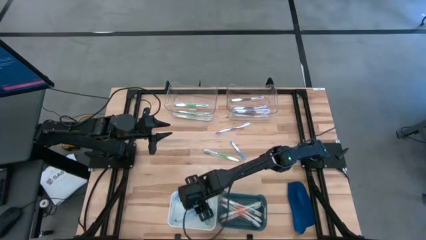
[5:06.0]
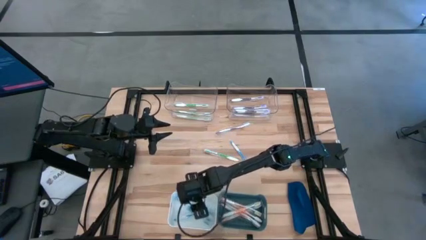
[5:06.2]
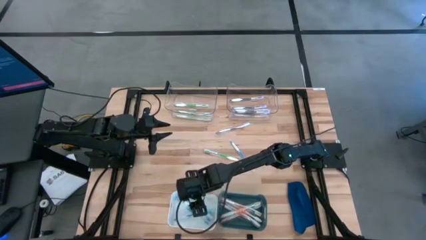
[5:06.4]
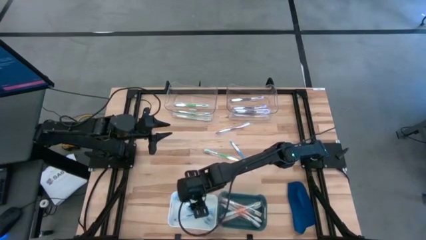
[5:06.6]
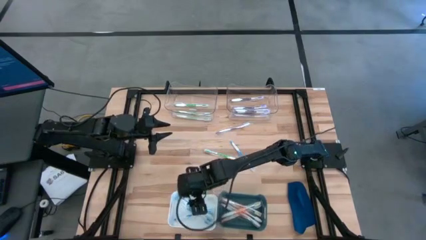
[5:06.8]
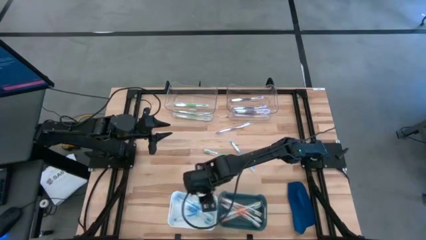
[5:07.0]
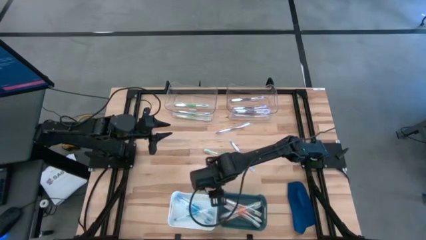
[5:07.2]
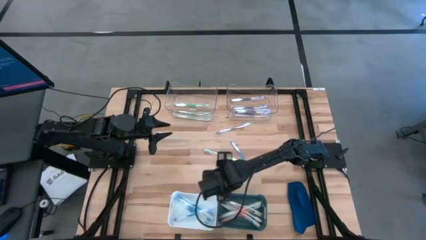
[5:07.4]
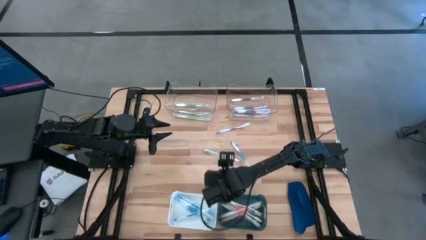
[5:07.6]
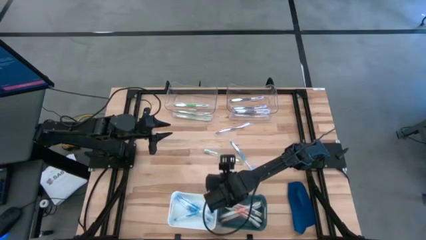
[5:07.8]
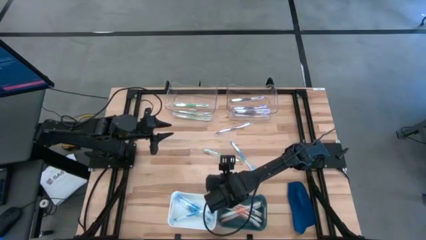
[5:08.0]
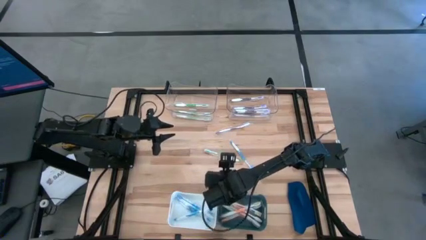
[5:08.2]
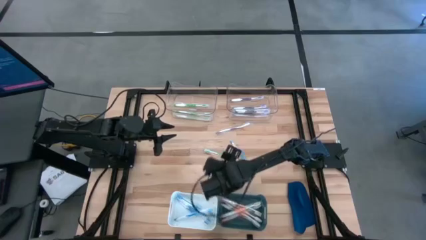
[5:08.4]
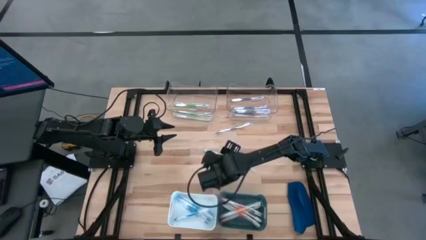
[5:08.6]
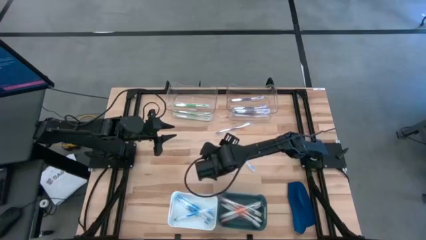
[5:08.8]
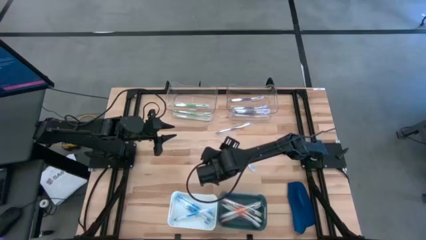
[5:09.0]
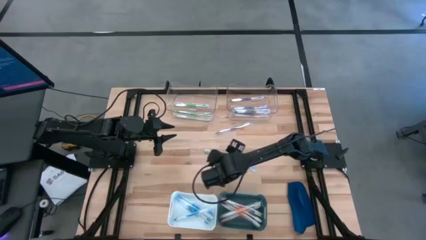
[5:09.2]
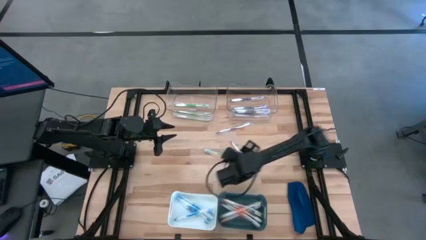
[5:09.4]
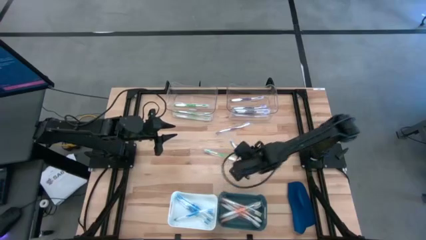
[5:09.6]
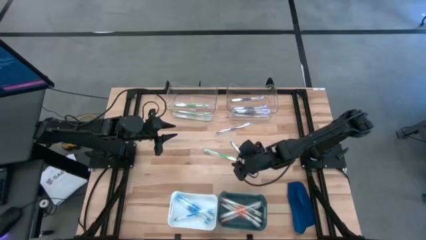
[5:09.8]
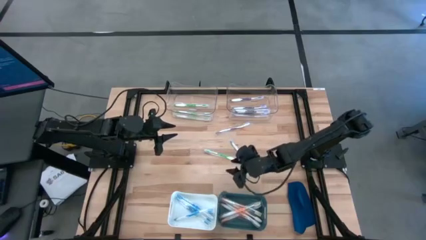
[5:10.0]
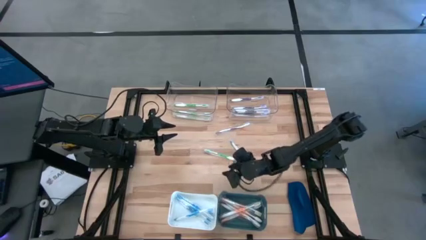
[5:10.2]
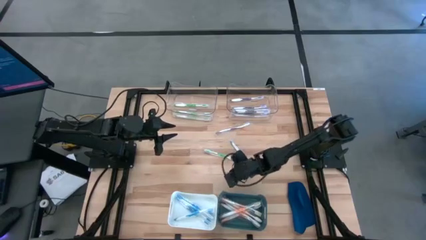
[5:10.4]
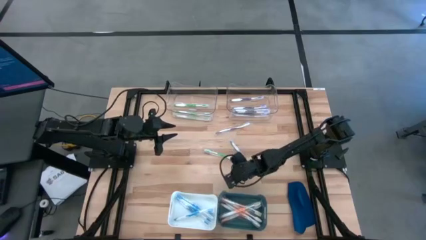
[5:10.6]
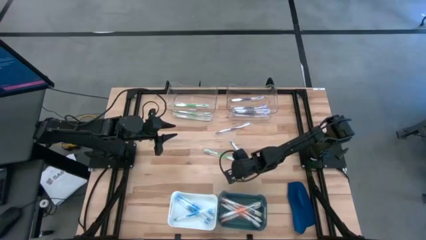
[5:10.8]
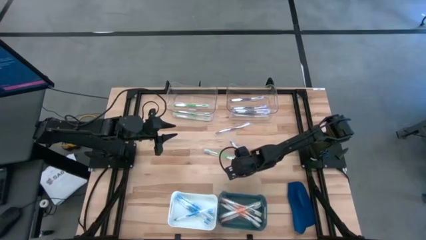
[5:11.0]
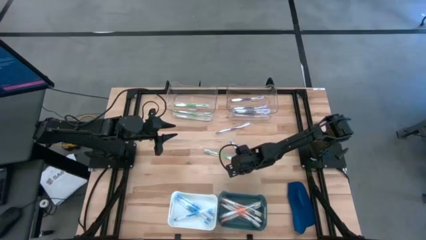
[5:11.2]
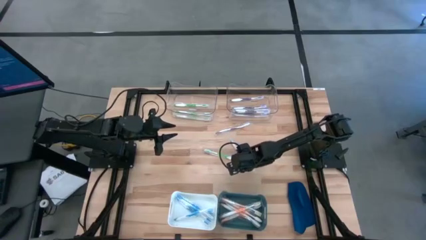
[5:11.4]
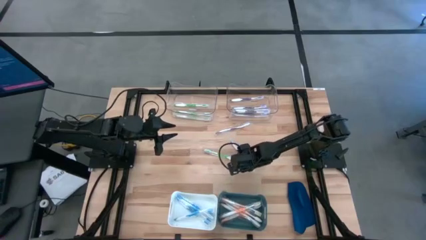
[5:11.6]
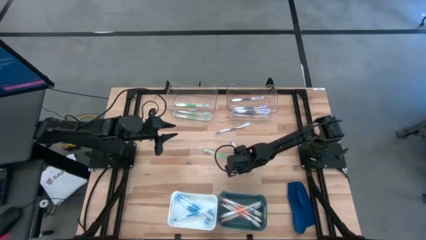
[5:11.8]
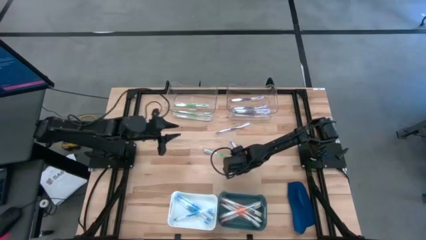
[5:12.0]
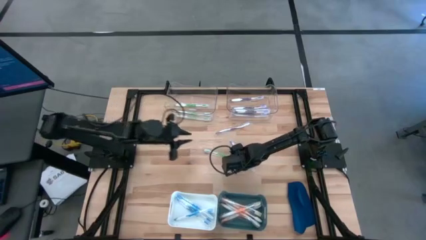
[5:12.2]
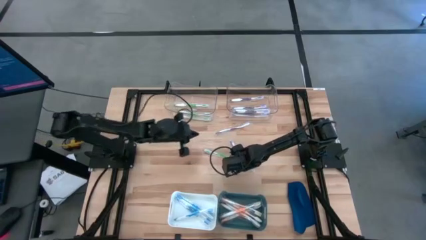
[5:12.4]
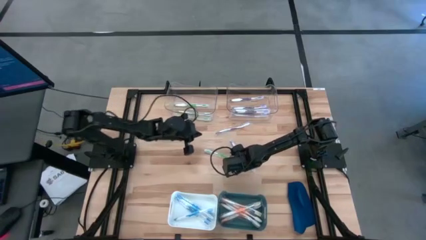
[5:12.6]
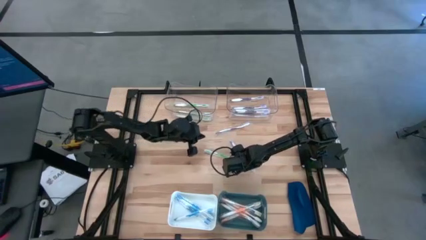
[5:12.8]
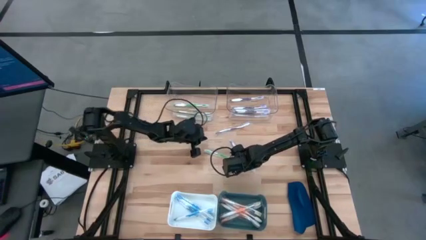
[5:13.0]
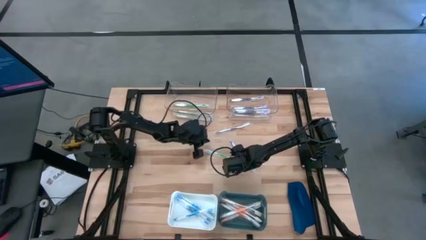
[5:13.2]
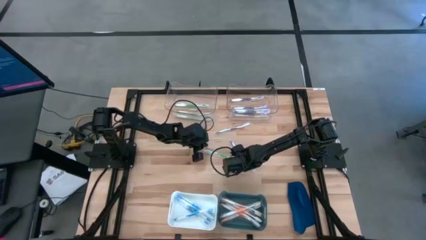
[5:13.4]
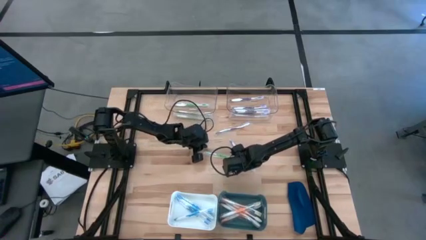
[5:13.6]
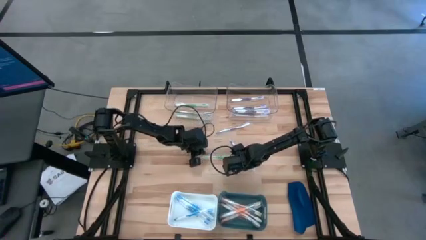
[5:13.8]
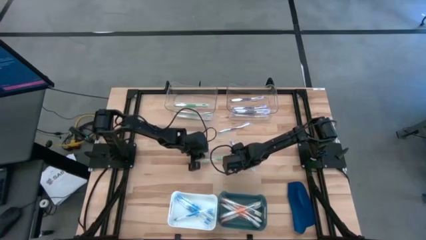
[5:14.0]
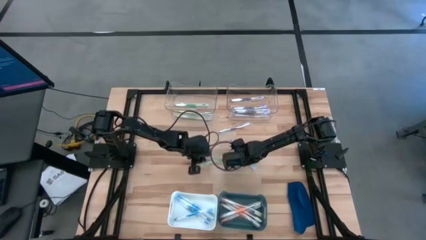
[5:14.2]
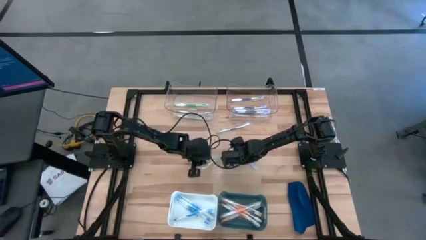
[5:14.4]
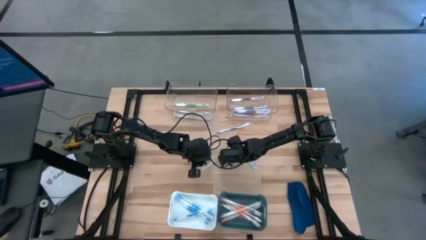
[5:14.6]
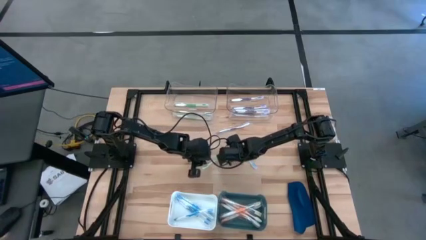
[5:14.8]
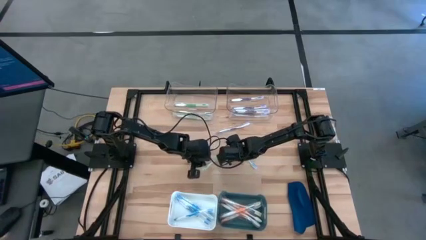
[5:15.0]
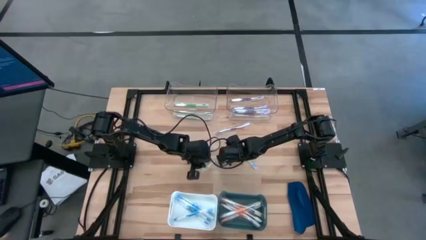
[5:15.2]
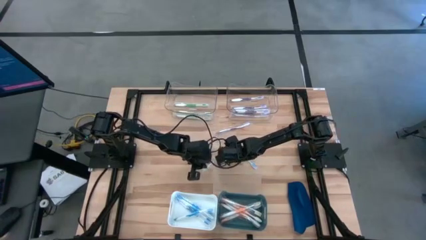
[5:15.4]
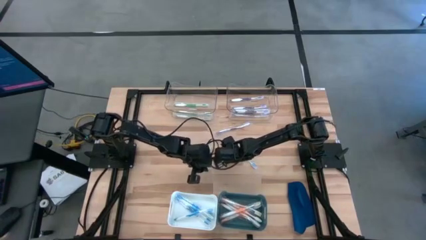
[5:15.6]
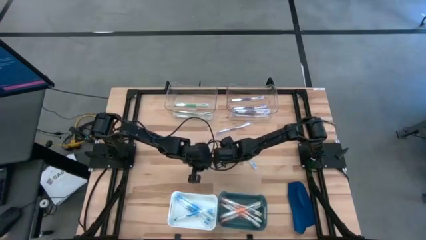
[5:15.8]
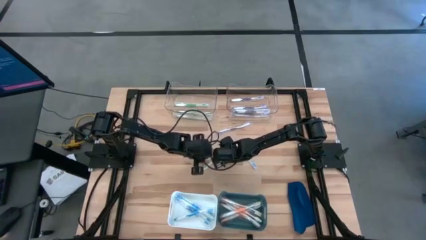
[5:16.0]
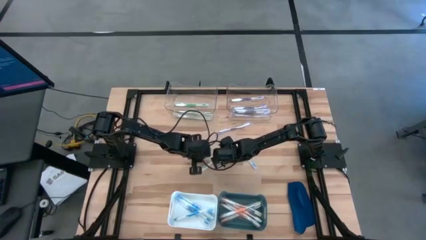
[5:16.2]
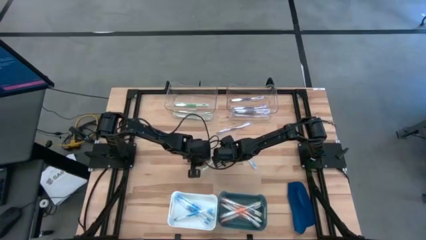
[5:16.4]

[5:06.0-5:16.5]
Task: Pick & Place Toothbrushes
Put the green toothbrush into the left transparent bin

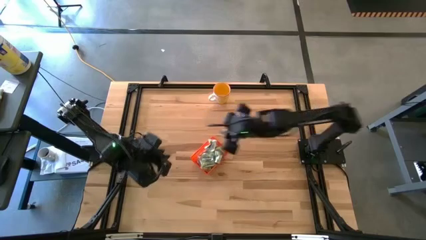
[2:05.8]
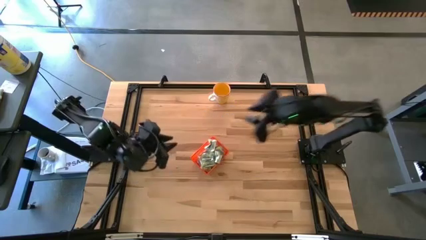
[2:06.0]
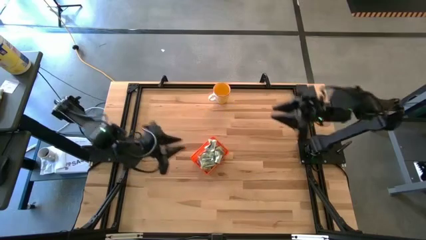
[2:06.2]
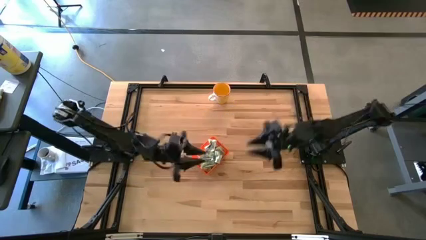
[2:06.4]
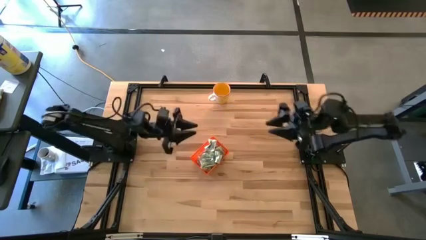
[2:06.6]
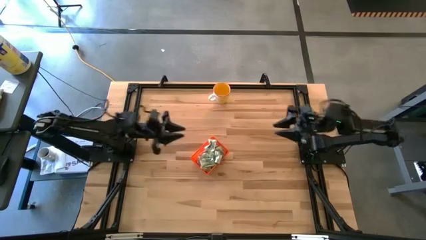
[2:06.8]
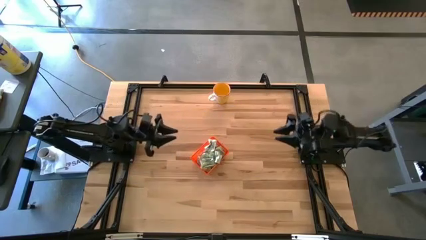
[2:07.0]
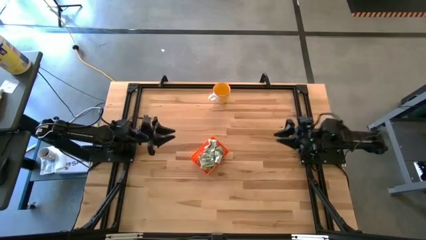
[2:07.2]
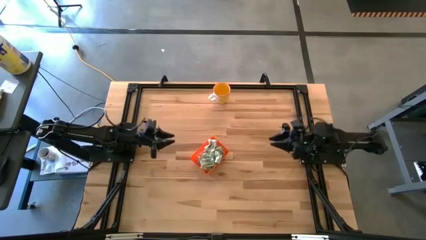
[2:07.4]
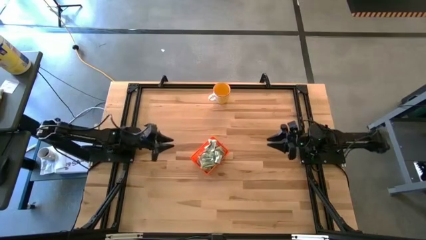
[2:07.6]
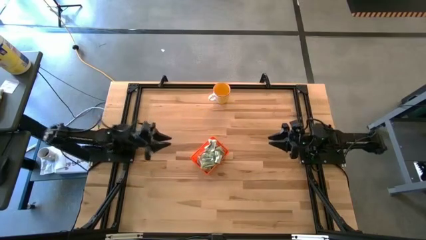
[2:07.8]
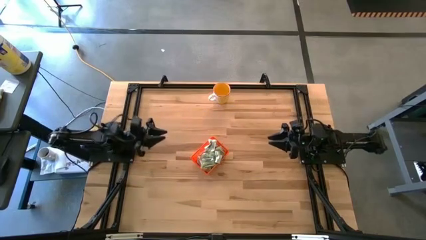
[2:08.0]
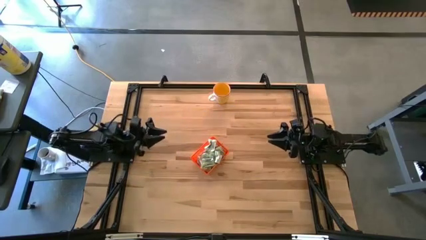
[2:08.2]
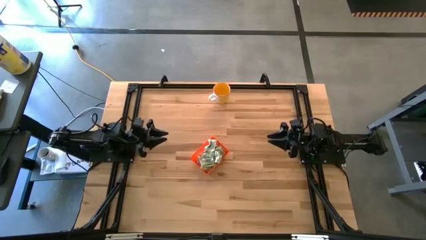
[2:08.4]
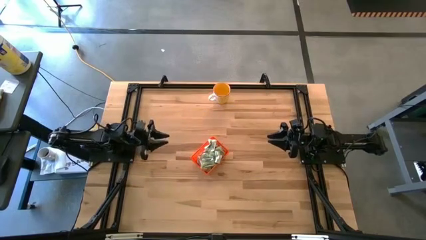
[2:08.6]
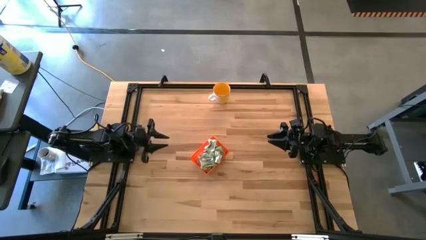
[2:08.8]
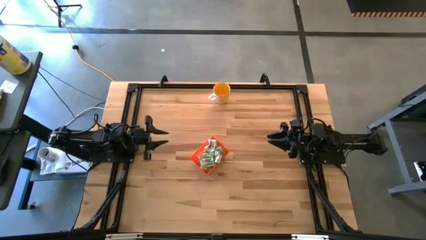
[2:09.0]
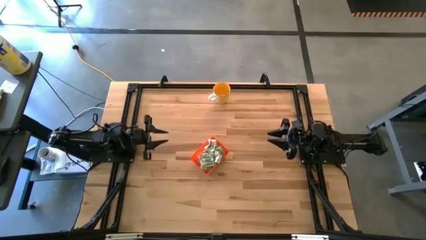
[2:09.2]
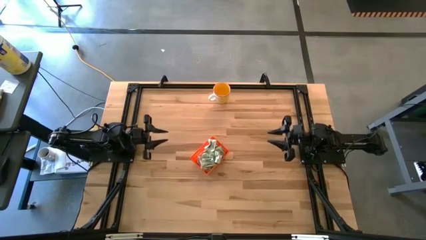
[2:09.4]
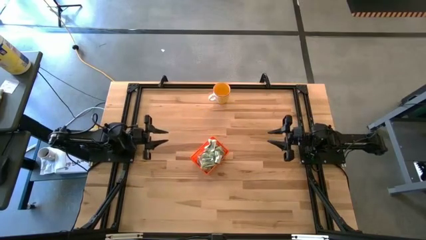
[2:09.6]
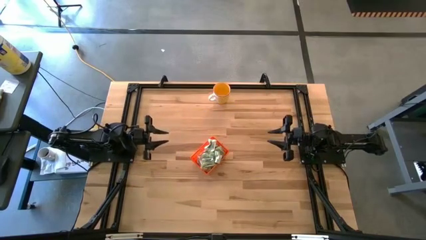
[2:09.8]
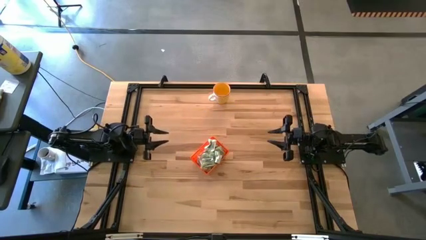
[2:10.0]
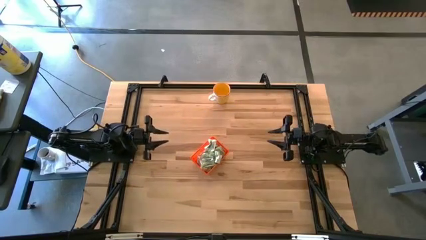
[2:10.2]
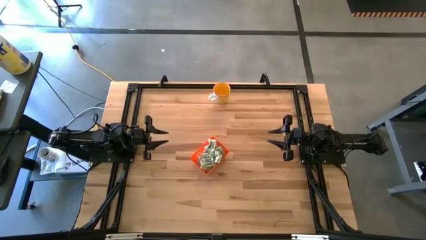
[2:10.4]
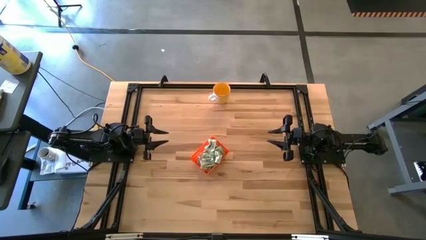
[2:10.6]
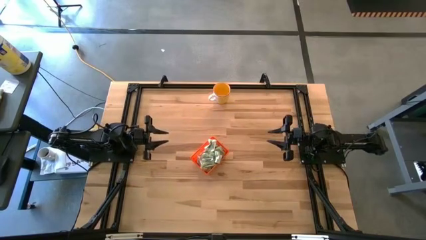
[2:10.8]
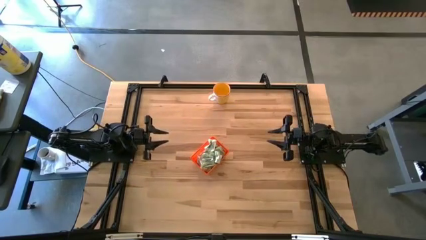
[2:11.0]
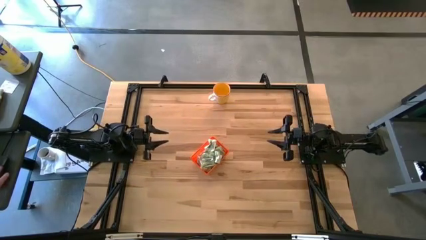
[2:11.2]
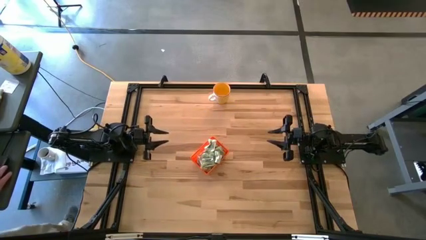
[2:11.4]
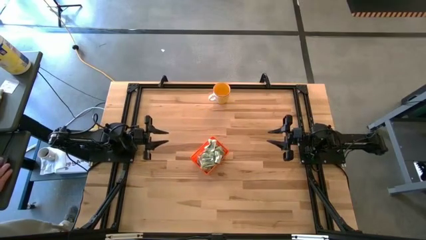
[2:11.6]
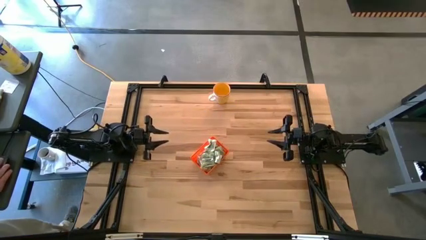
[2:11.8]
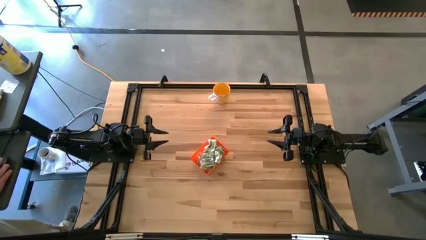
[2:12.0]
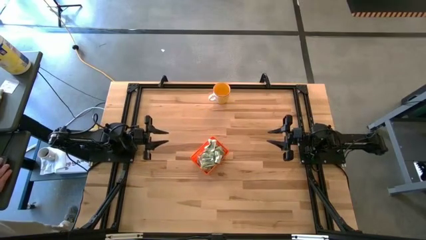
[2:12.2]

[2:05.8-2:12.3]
Task: Pick and place Stevia / Truvia into bins
Return to Home Position
